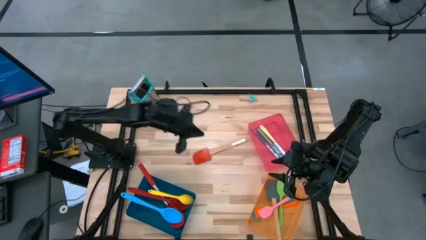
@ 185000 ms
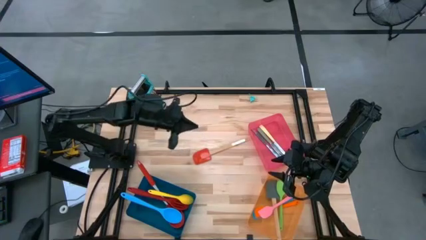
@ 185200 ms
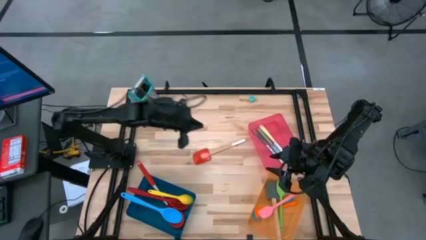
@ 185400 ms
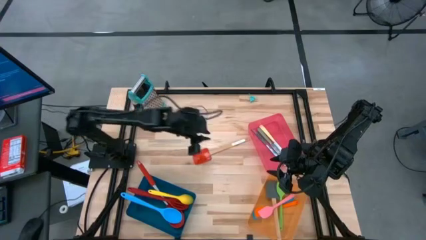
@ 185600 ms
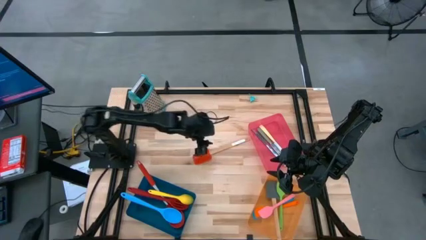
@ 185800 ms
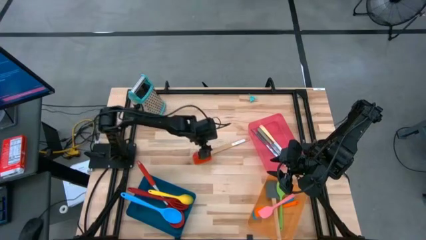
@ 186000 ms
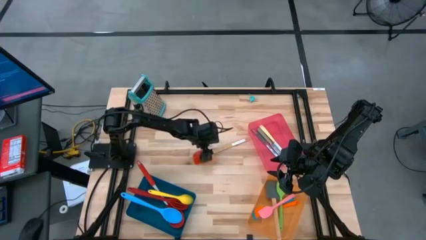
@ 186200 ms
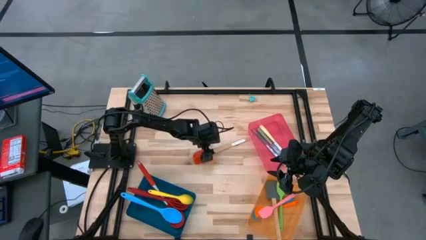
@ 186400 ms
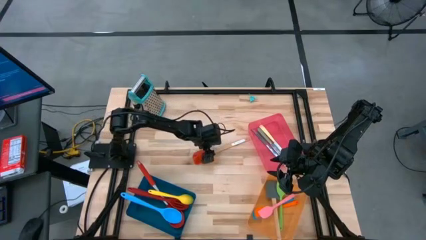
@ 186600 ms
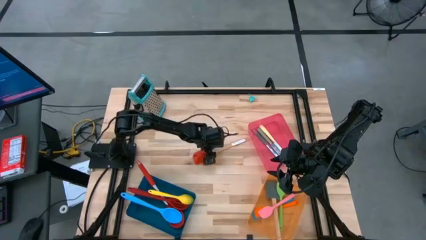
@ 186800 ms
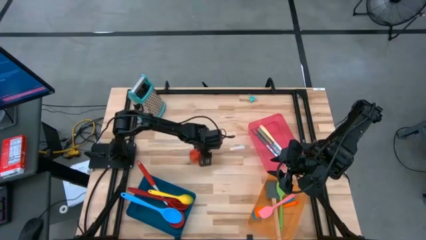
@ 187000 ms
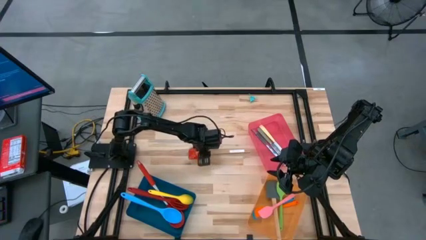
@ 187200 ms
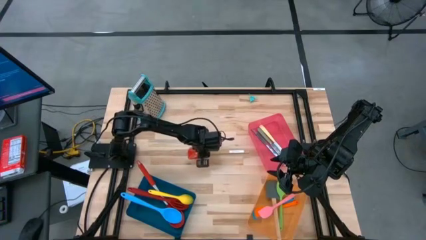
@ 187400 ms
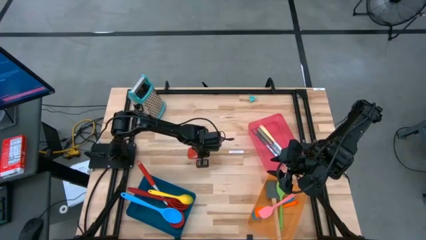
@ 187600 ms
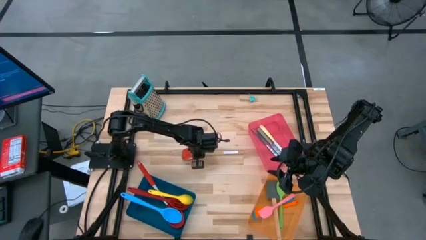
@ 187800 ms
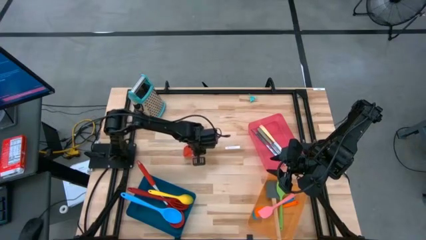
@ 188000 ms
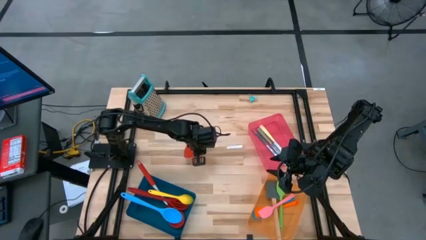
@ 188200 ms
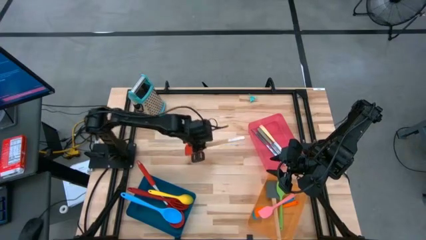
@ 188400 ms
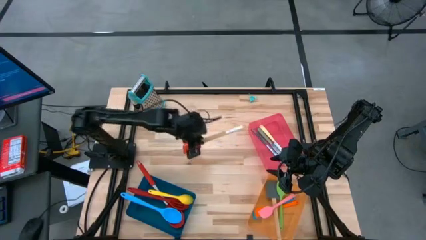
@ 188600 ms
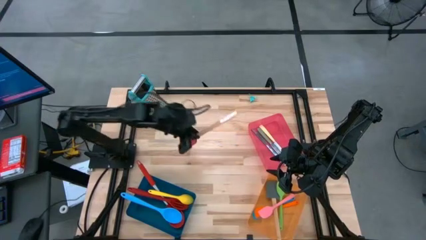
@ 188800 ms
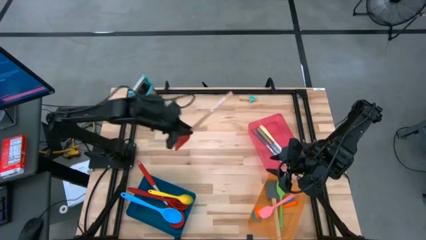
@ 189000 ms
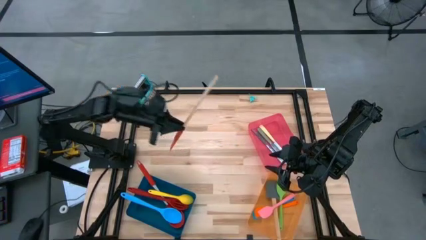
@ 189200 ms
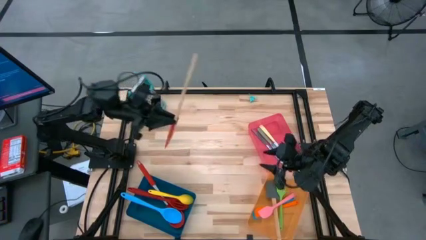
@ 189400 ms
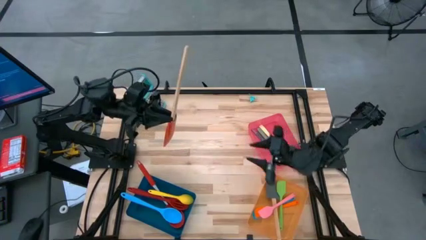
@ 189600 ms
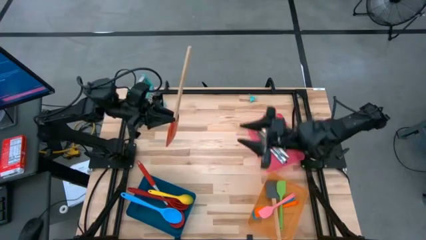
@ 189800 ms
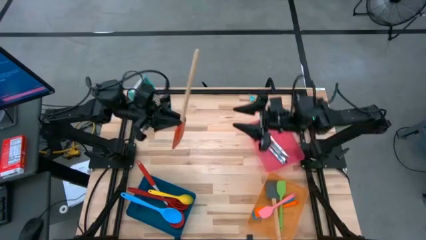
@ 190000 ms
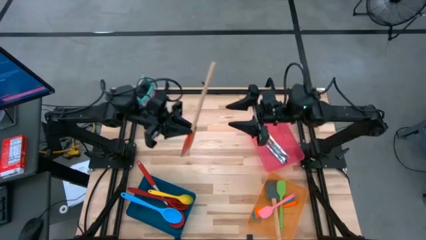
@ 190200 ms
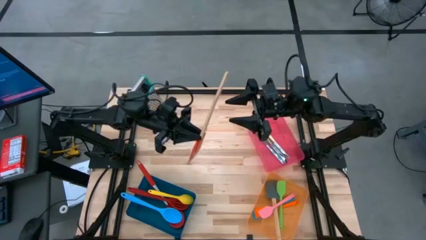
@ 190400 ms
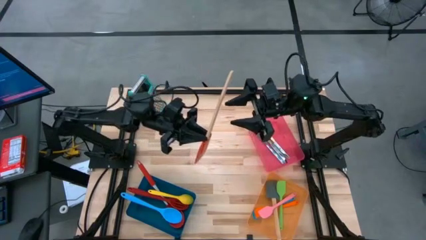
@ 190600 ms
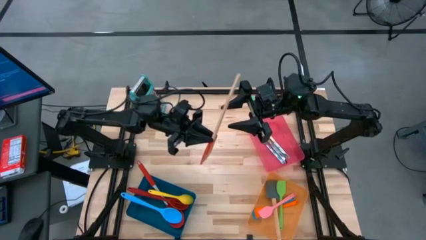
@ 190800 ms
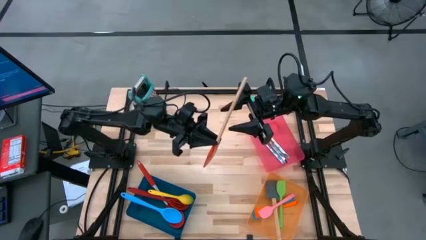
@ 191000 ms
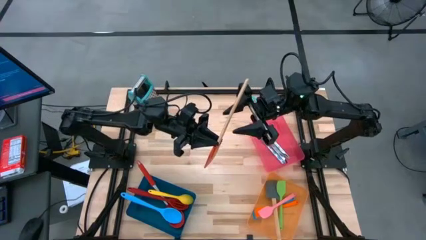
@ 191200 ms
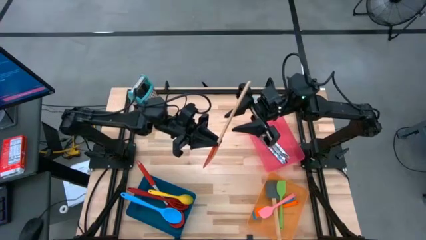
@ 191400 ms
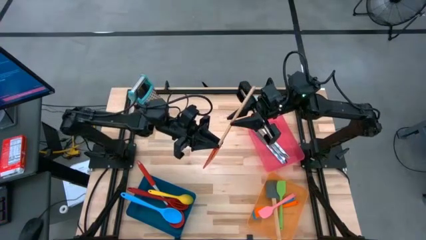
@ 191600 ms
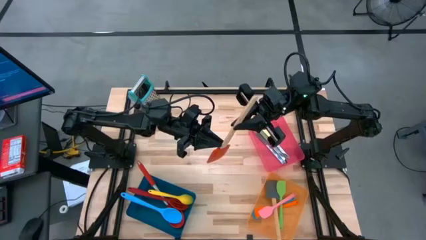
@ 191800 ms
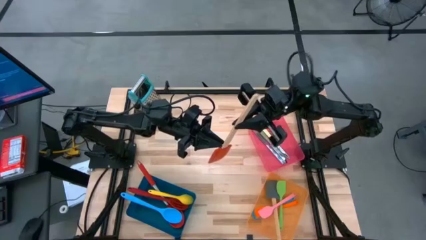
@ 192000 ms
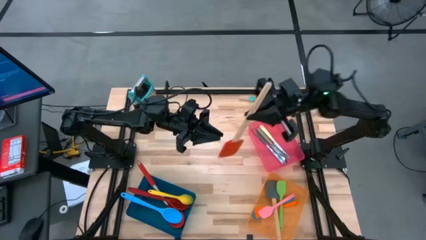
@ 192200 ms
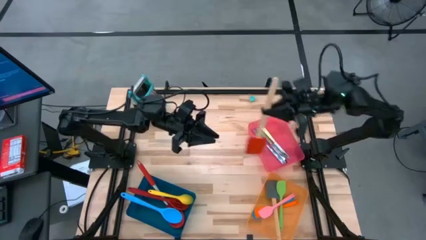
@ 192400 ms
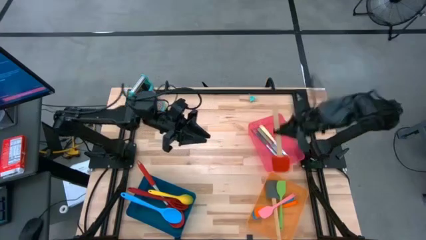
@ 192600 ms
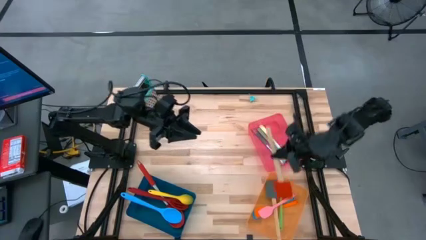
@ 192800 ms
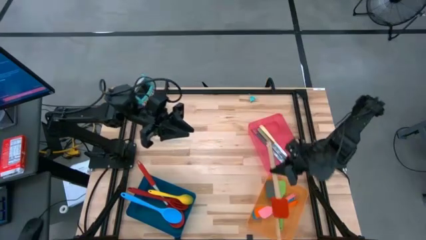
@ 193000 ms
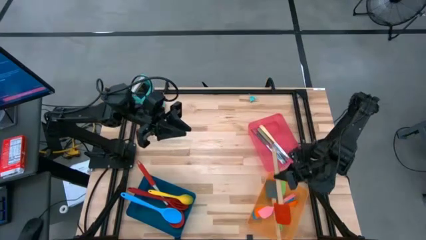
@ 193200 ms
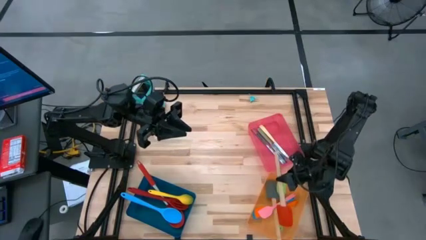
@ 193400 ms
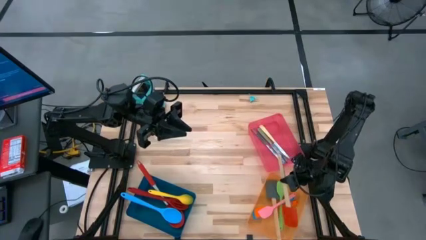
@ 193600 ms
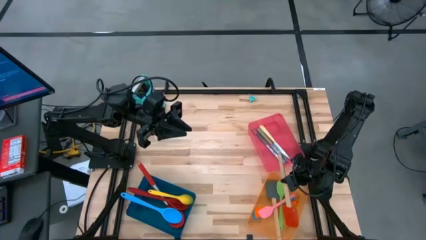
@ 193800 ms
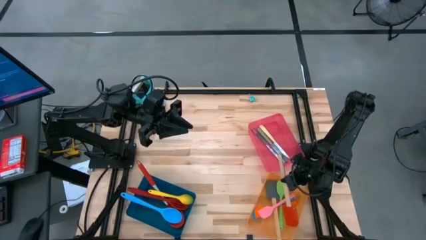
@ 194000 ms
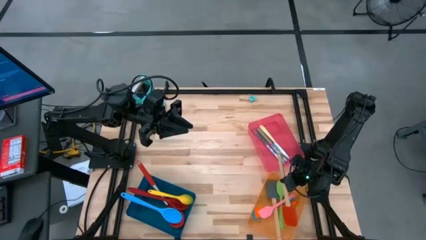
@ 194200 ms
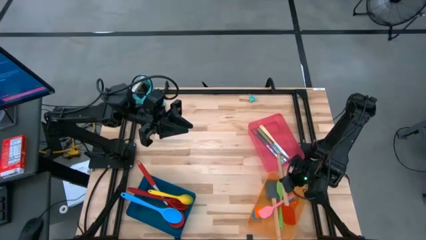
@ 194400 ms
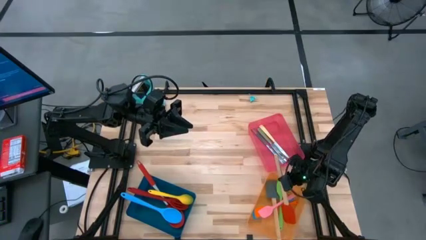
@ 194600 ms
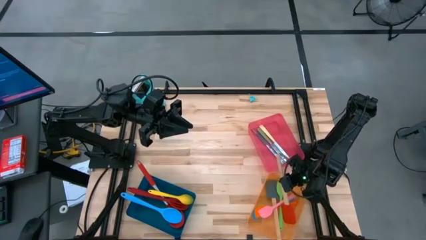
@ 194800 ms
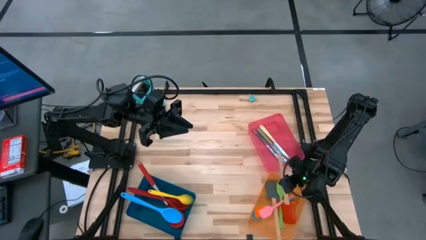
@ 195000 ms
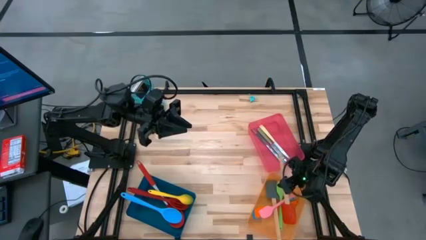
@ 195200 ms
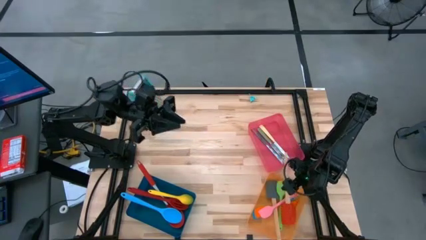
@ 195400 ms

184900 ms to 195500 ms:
Task: Pick & Place Kitchen Items
Put the red spatula into the orange bin

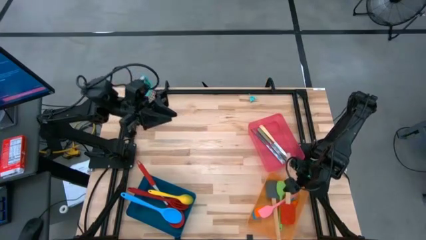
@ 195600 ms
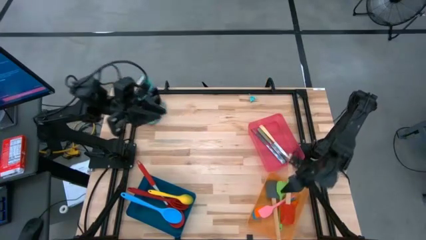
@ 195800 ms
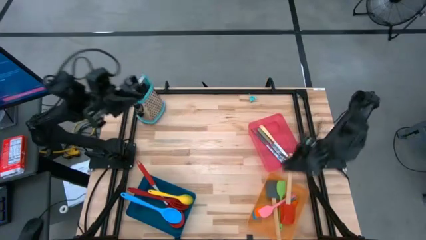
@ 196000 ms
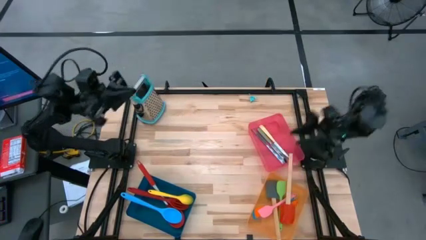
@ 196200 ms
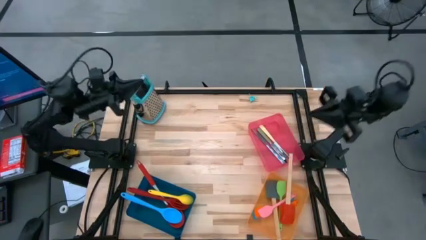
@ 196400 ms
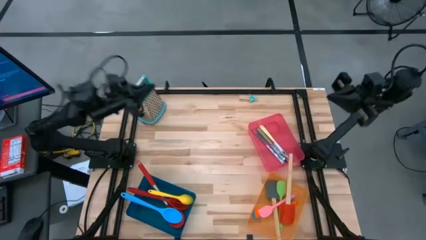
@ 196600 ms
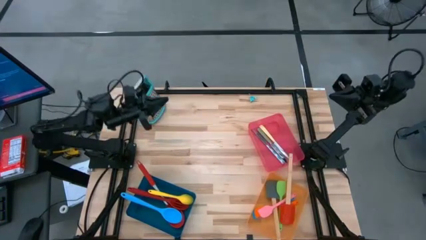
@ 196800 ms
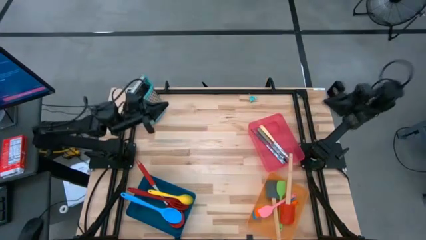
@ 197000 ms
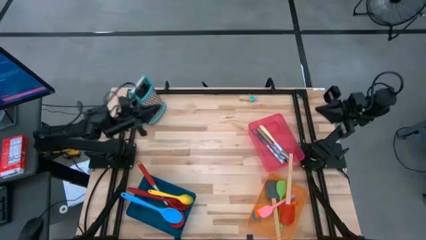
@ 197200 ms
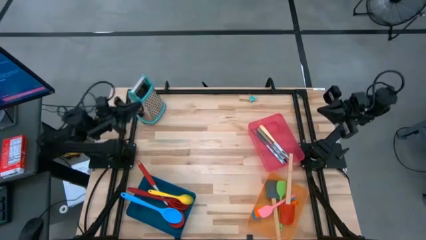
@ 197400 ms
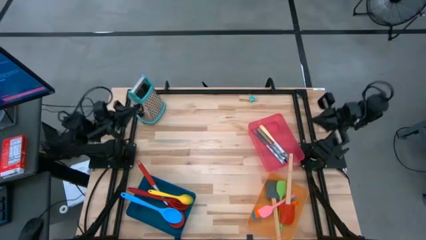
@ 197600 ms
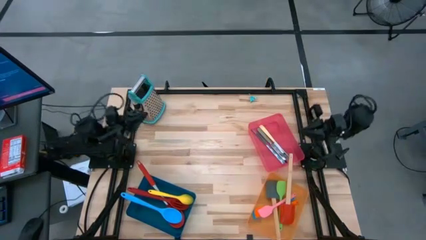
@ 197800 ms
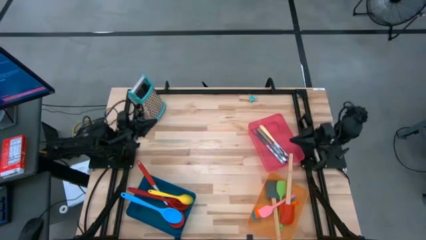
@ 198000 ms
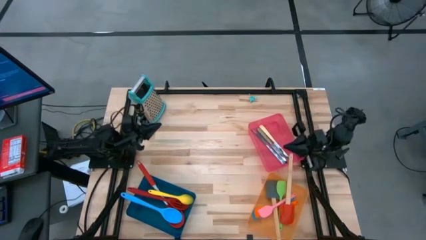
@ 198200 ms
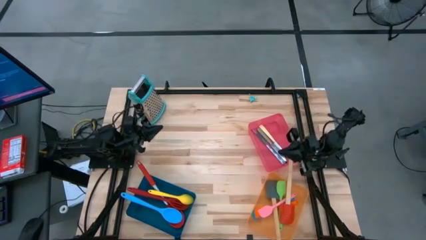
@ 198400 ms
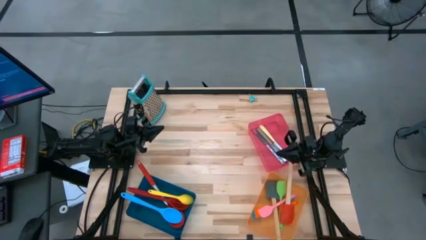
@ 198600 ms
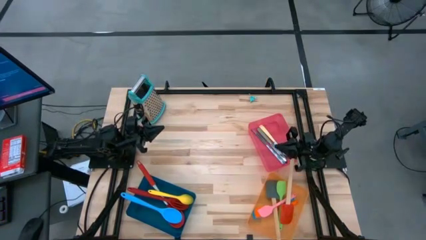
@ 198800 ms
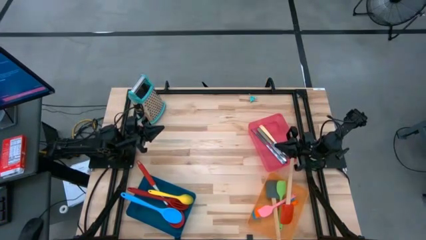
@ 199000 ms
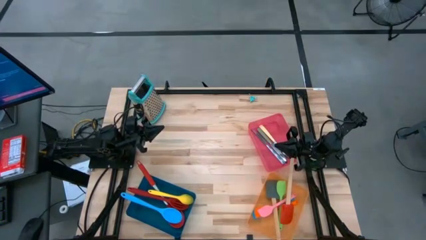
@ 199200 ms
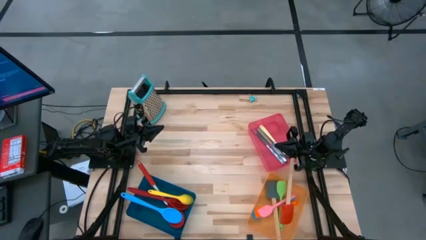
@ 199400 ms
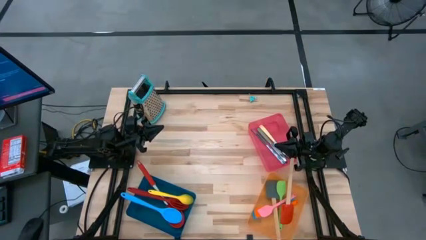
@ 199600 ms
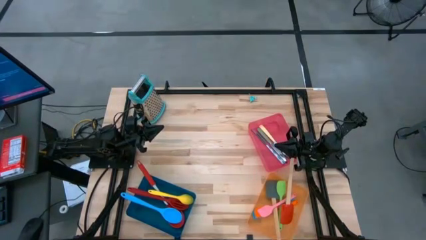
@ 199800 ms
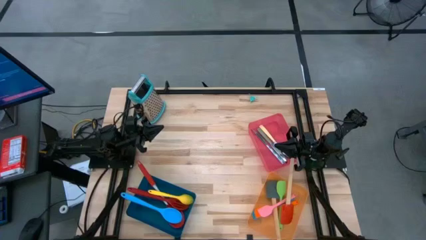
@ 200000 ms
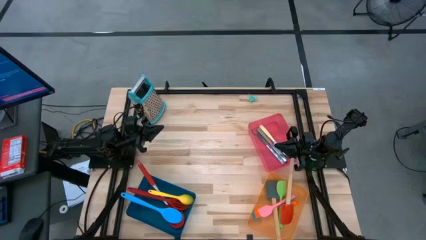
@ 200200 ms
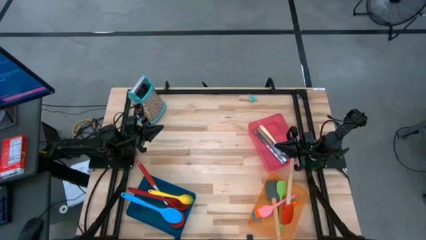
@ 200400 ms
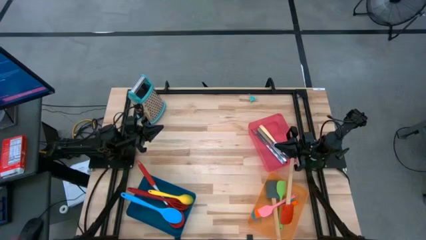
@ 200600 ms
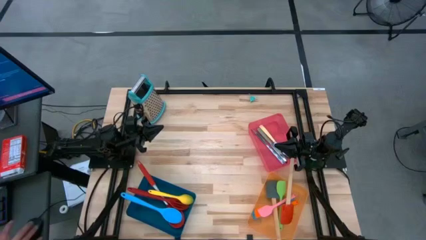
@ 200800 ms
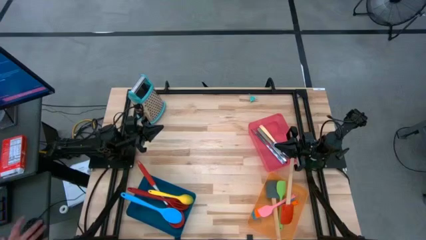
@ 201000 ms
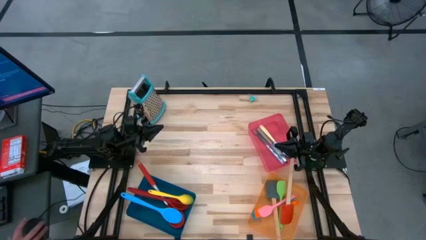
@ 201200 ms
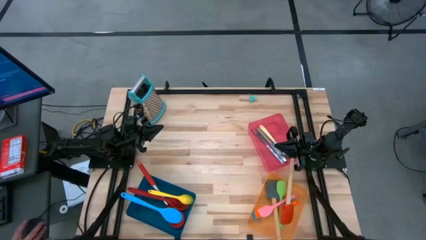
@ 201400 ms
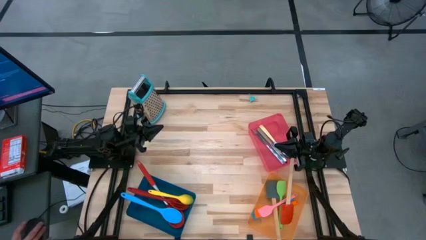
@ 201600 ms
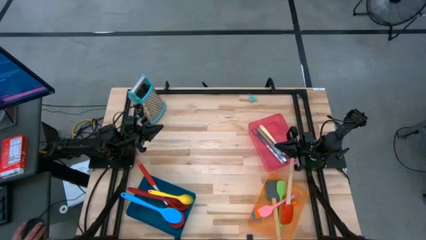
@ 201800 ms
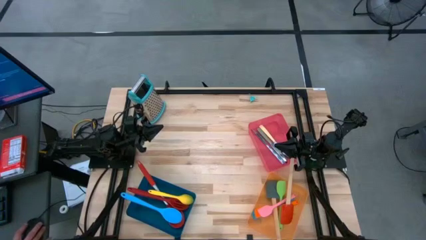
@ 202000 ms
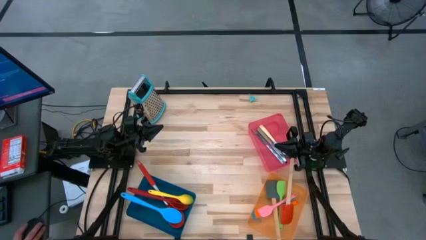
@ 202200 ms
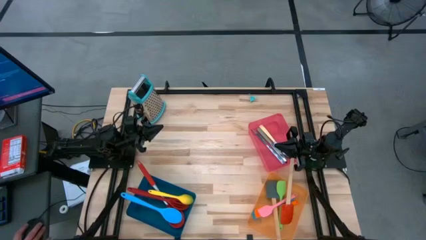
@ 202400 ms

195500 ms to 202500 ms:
Return to Home Position
